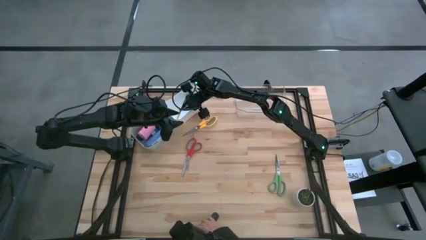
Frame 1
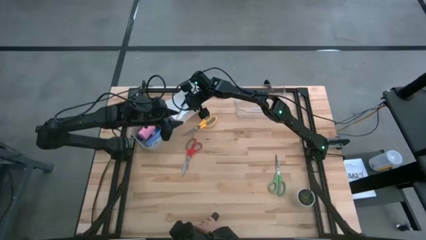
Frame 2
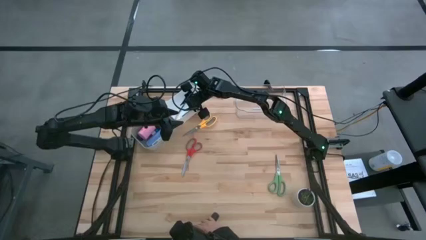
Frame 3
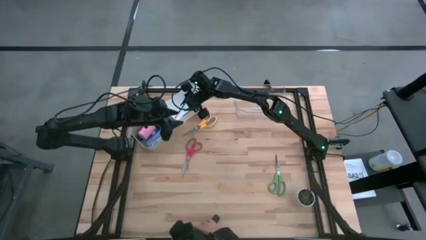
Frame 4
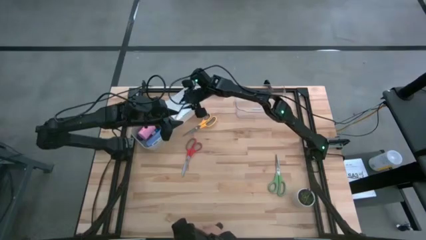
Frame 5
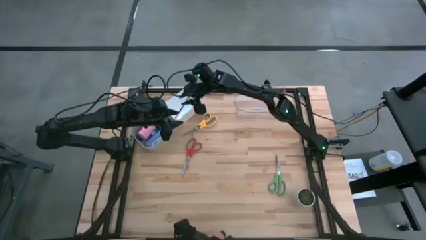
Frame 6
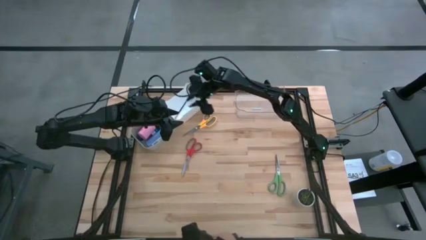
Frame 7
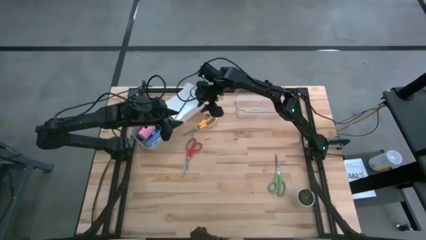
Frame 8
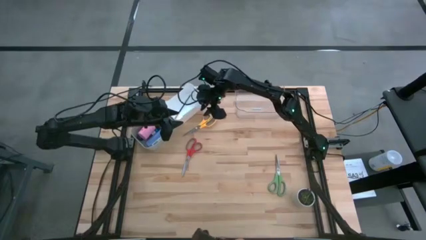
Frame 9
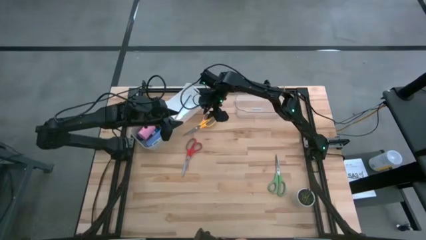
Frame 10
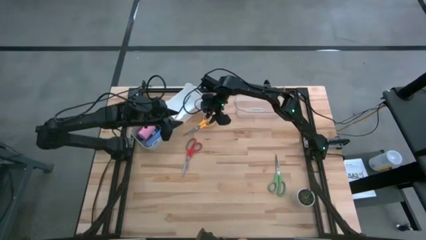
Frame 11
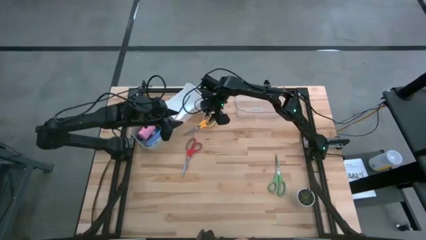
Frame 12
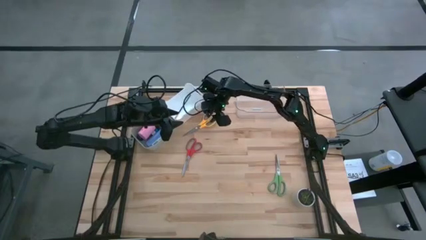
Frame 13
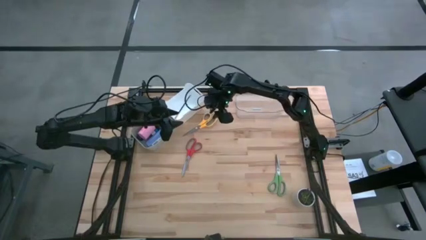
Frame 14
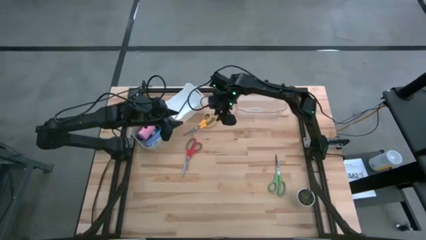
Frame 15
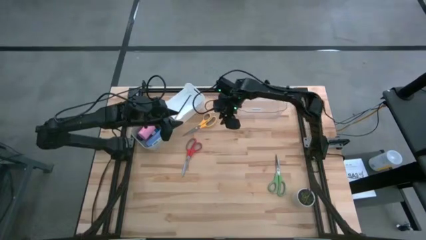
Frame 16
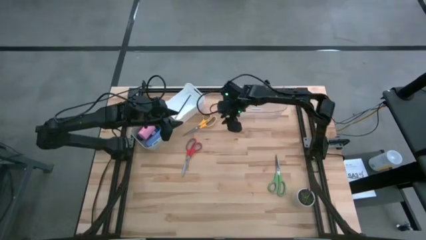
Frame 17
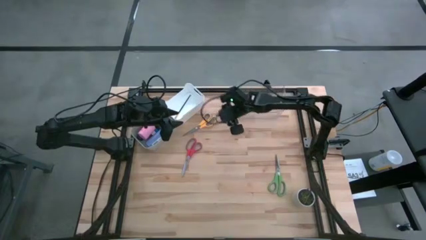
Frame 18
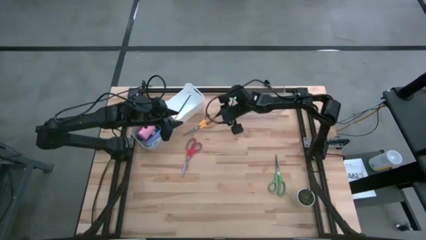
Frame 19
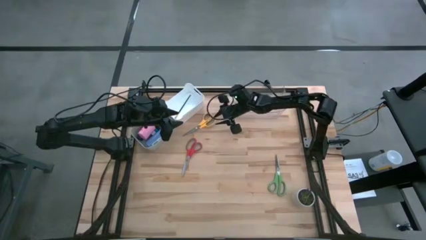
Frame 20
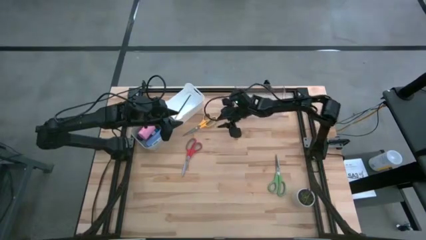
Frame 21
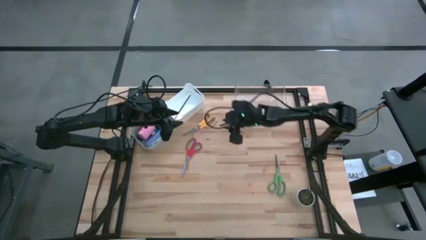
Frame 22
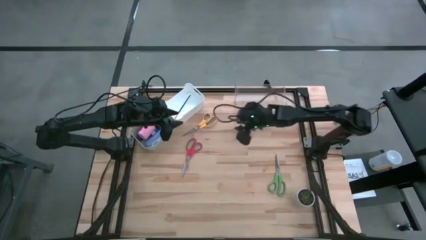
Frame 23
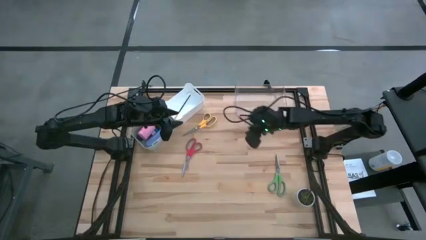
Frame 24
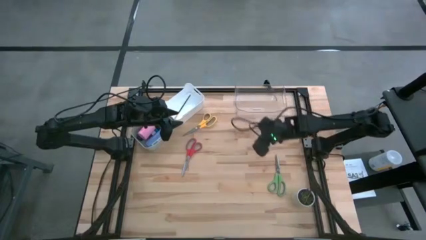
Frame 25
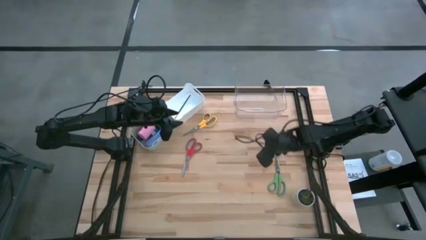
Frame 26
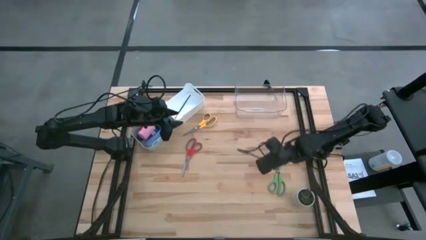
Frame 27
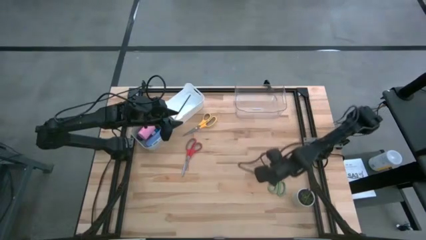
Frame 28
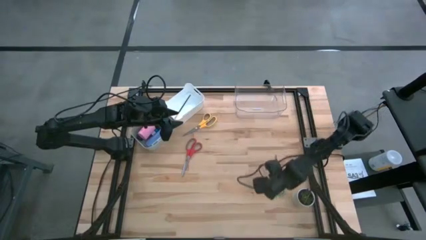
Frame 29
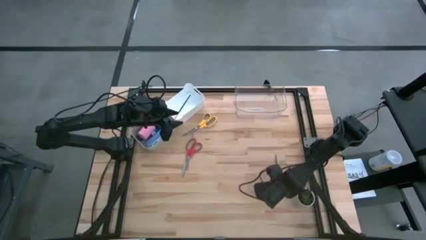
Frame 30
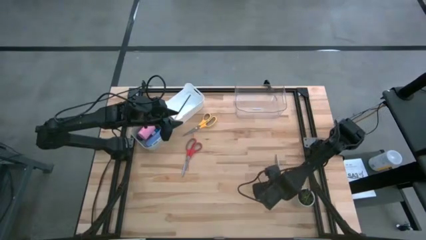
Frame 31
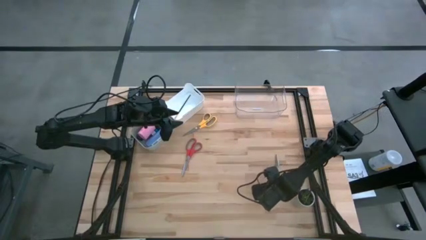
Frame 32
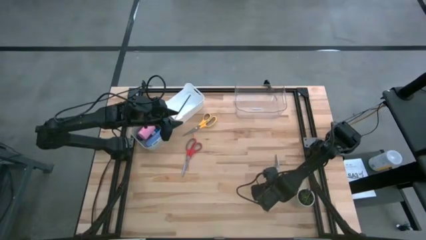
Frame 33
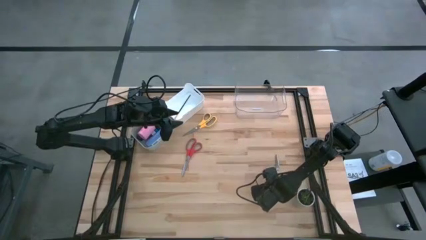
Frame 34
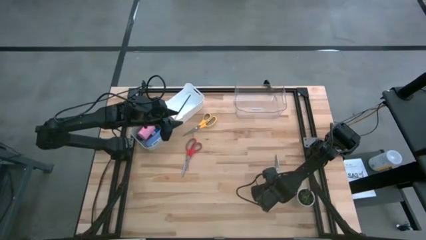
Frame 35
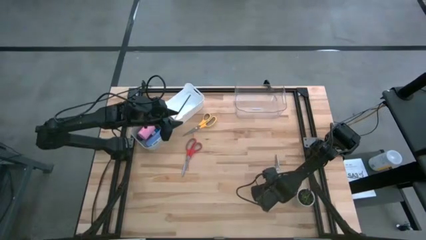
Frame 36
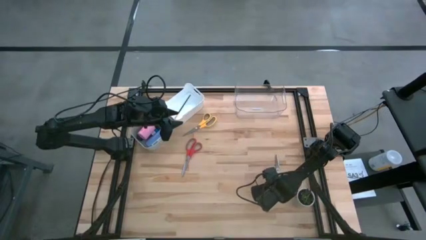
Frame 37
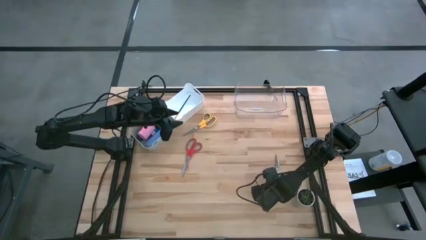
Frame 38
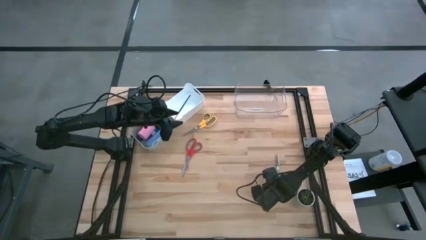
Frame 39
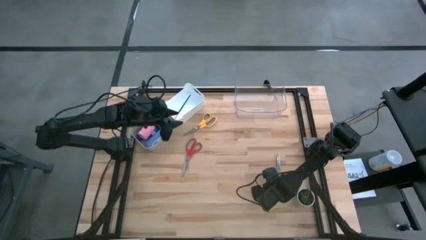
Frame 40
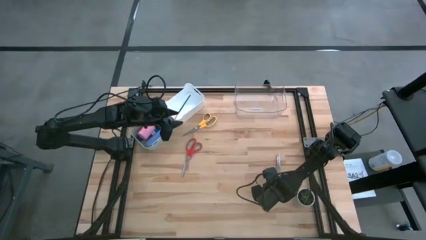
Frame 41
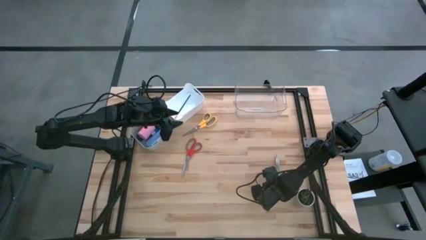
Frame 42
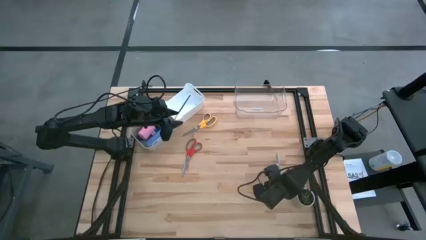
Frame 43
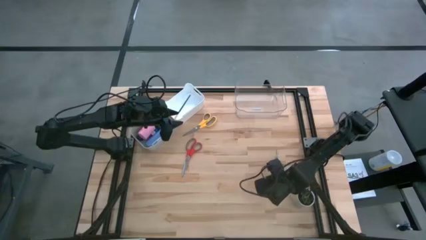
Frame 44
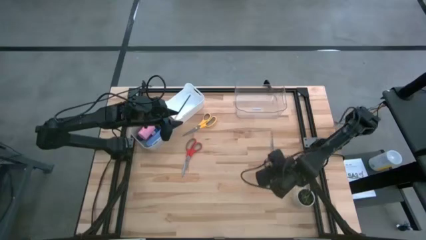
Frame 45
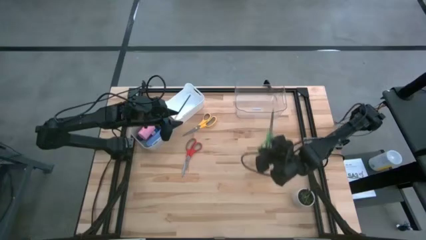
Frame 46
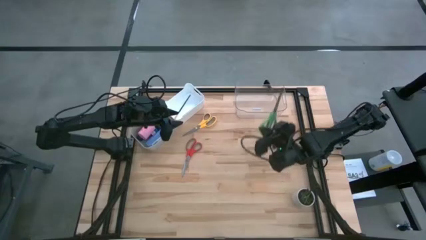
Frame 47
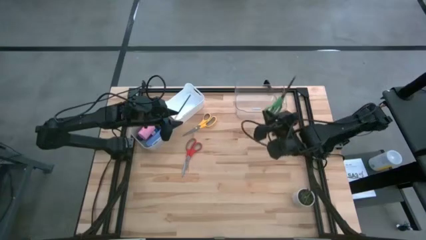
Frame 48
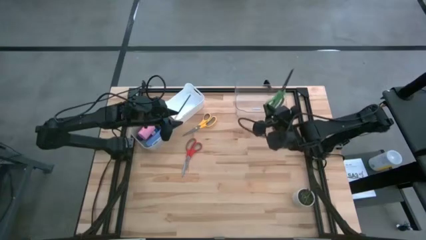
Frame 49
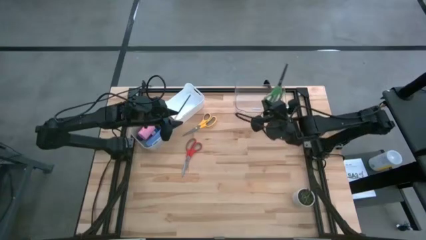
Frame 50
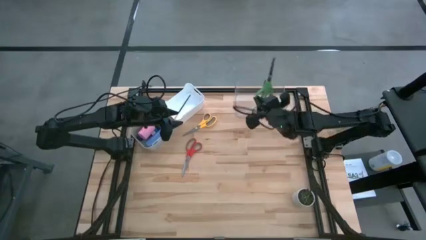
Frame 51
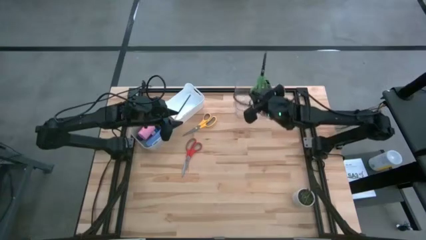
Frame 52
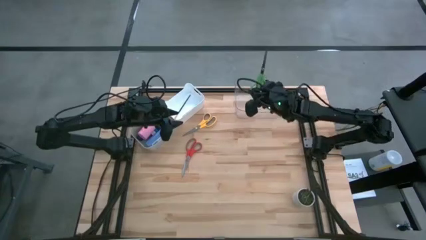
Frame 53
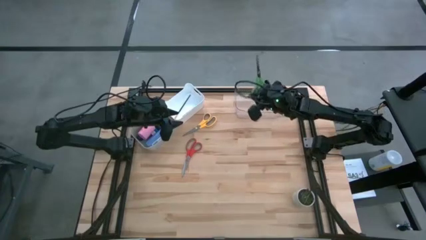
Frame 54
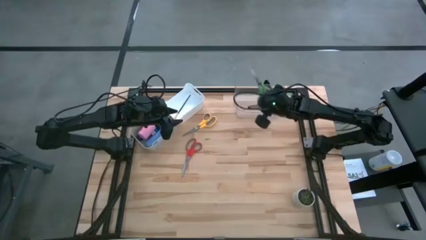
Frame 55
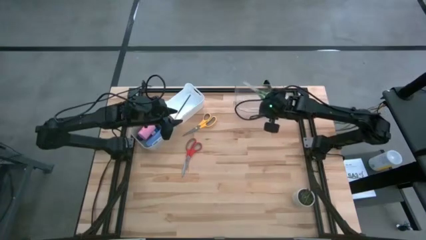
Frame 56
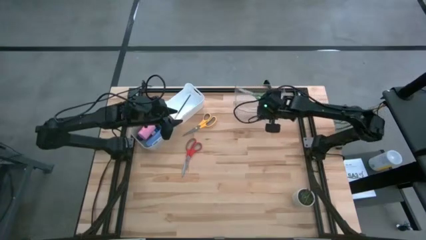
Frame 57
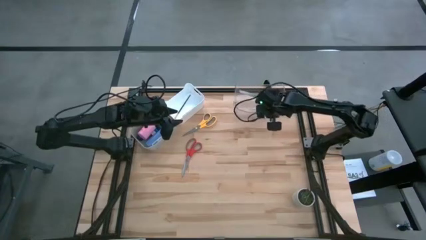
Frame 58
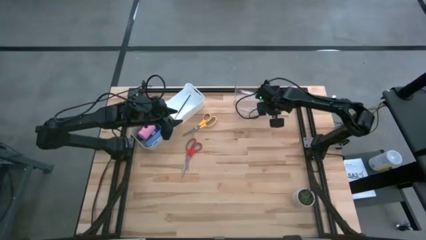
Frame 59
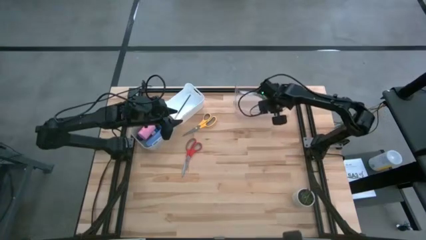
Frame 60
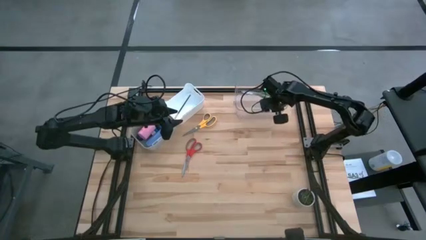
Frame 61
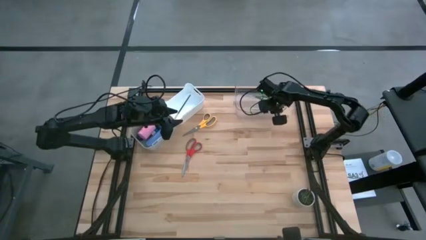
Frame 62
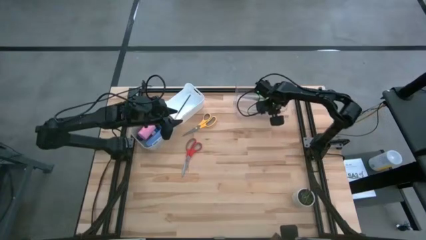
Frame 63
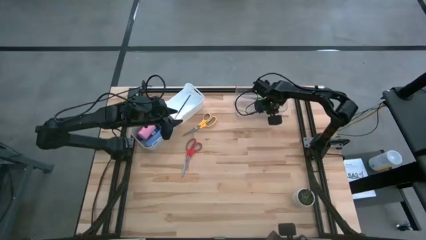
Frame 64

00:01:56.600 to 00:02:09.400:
Task: Pick & Place Paint Supplies
Put the green scissors into the transparent bin

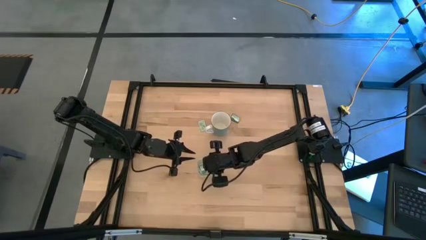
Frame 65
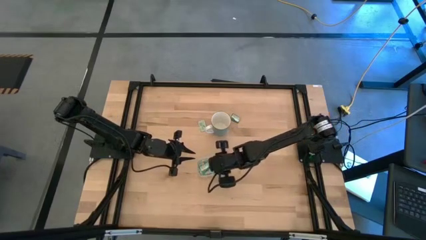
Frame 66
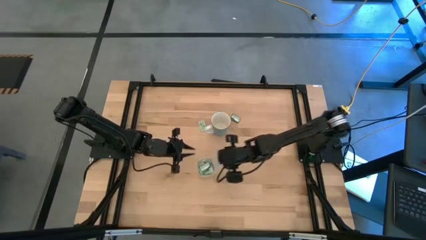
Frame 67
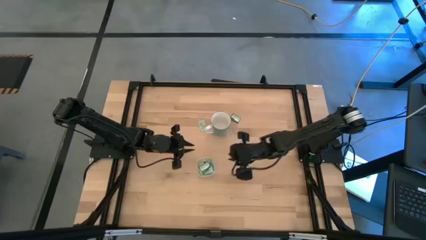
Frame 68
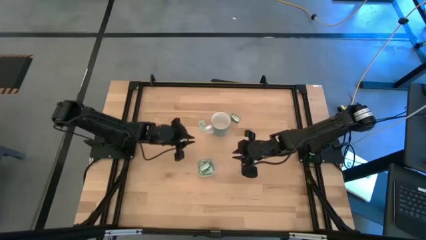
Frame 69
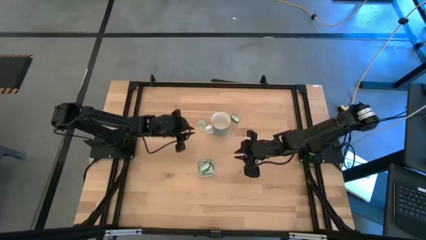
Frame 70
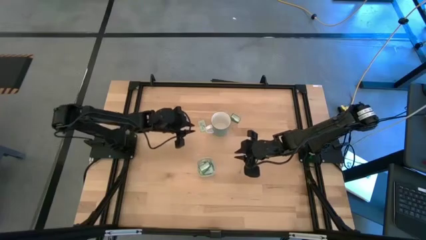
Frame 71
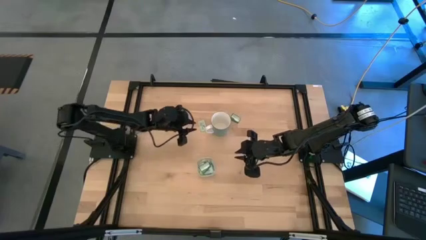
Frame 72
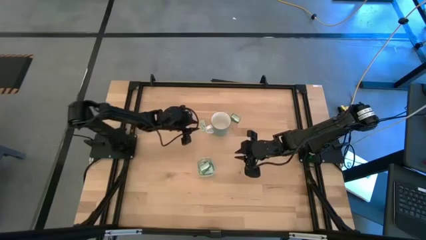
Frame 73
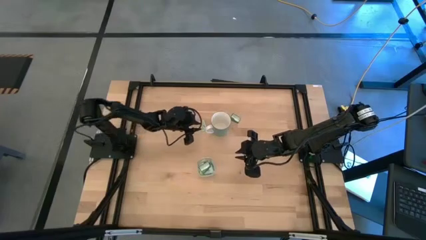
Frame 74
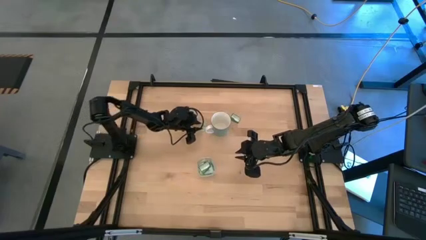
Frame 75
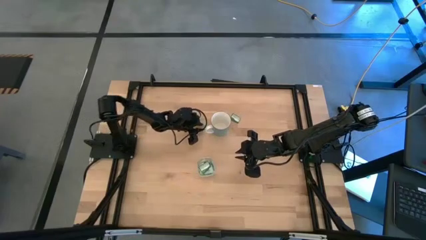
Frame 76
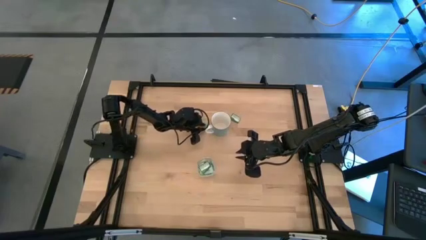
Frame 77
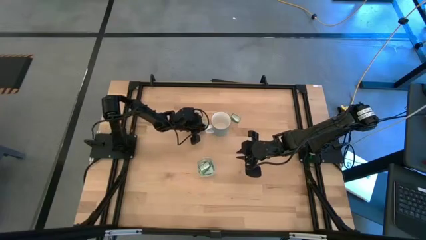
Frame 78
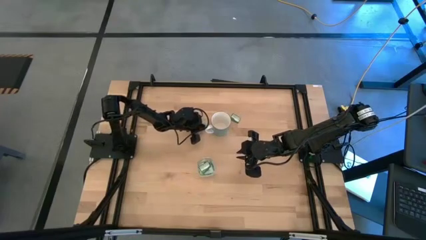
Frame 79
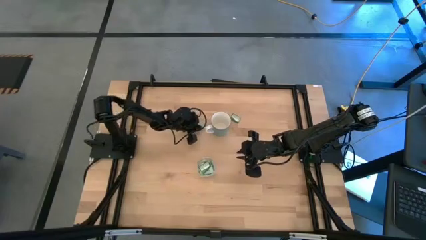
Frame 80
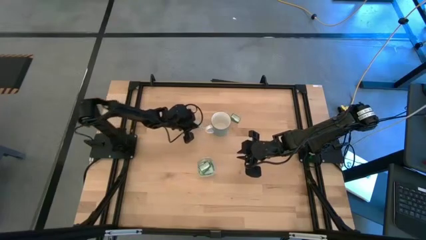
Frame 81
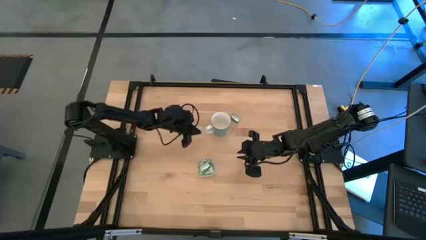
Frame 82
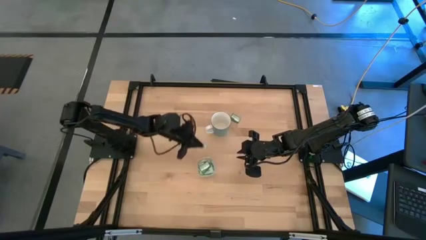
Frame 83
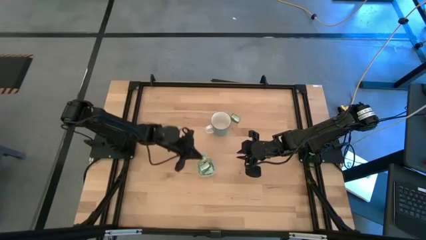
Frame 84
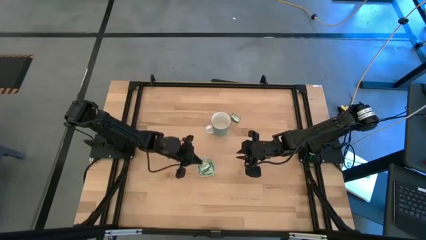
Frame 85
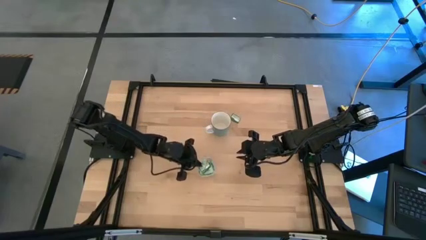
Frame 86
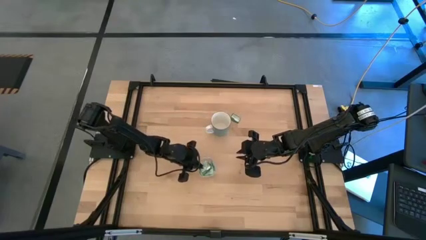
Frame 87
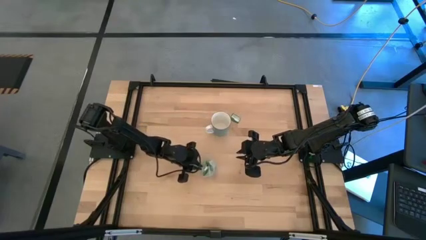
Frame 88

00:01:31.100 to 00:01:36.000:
Task: Pick and place Stevia / Truvia into bins
Put the white stevia packet into the transparent bin
